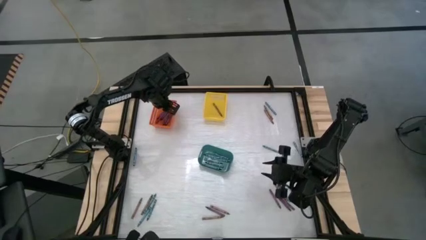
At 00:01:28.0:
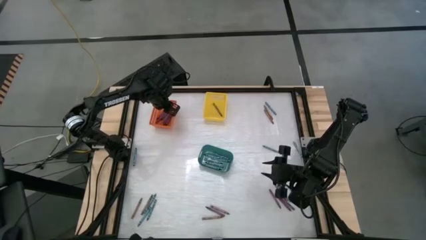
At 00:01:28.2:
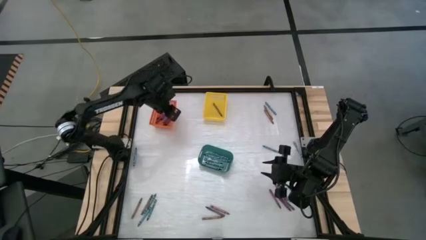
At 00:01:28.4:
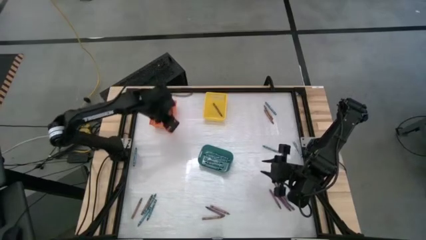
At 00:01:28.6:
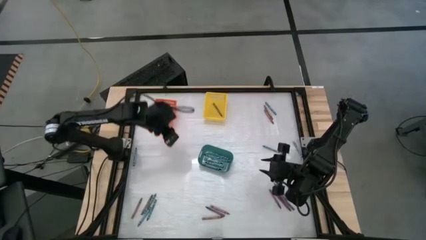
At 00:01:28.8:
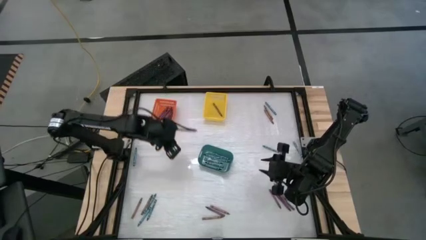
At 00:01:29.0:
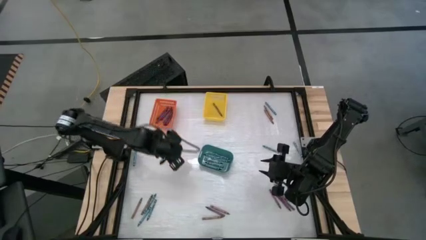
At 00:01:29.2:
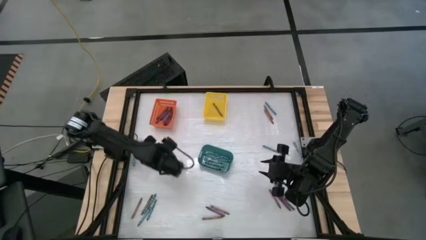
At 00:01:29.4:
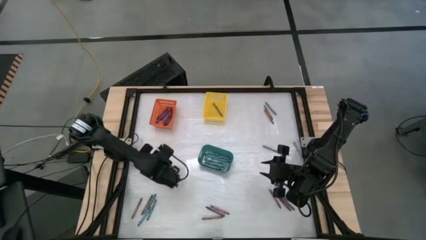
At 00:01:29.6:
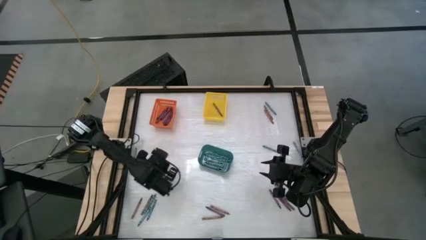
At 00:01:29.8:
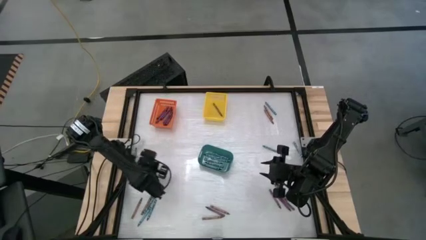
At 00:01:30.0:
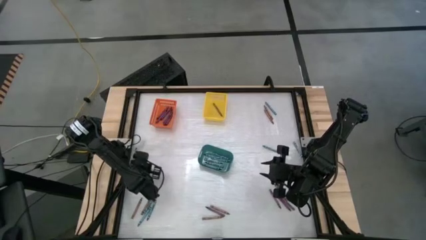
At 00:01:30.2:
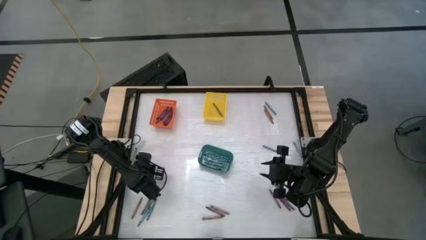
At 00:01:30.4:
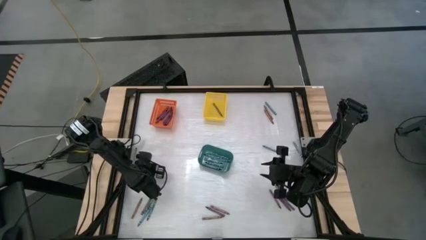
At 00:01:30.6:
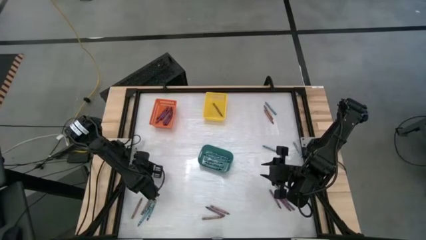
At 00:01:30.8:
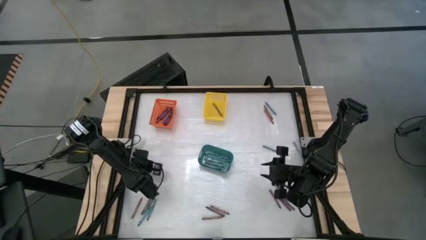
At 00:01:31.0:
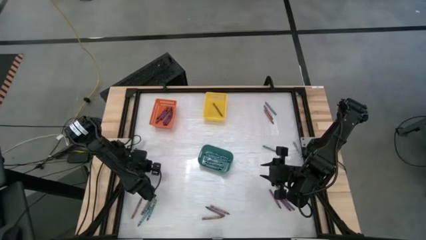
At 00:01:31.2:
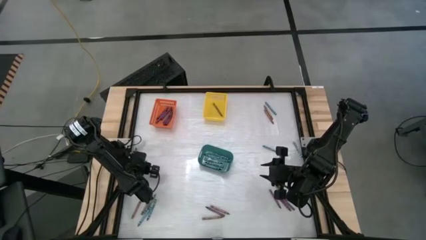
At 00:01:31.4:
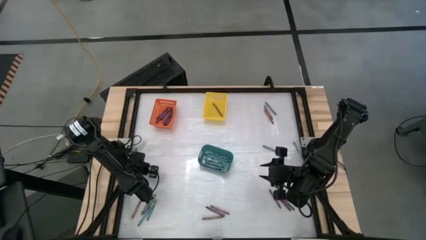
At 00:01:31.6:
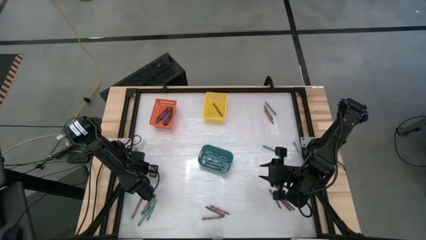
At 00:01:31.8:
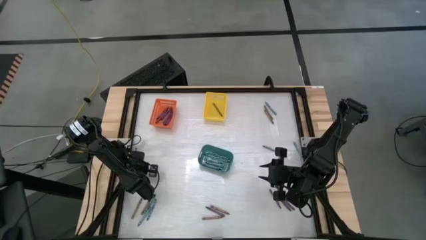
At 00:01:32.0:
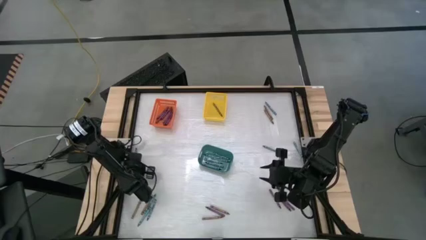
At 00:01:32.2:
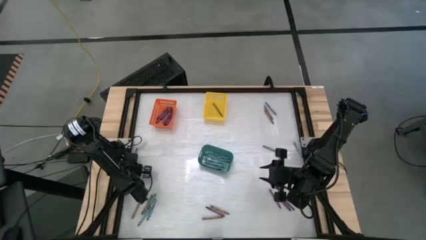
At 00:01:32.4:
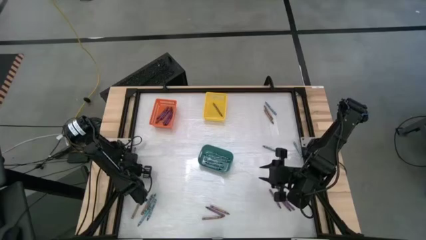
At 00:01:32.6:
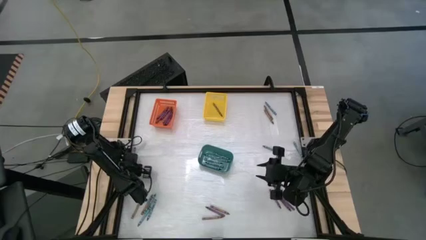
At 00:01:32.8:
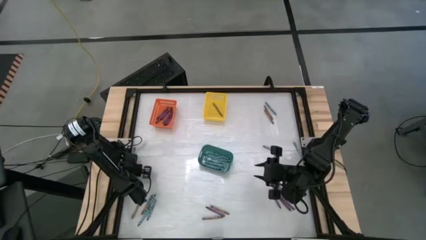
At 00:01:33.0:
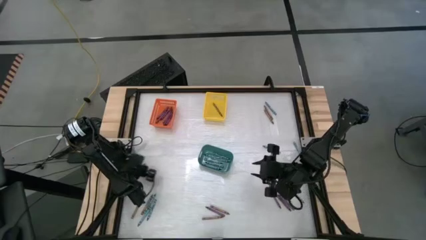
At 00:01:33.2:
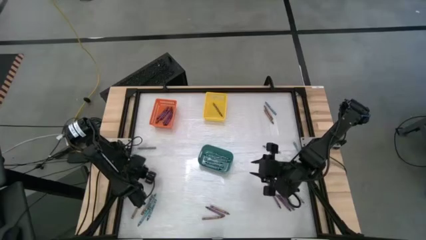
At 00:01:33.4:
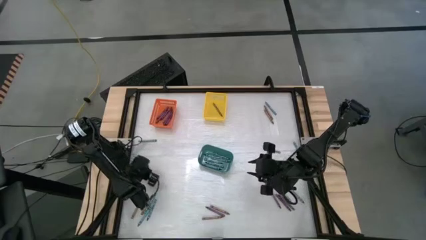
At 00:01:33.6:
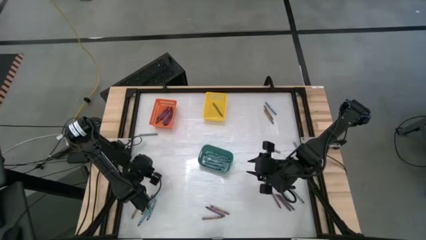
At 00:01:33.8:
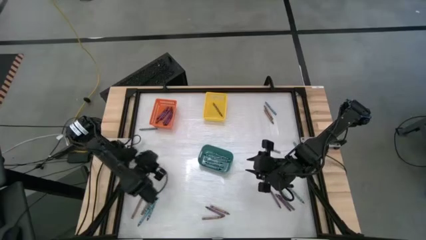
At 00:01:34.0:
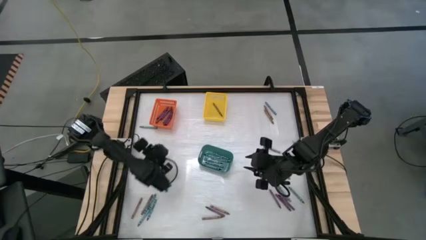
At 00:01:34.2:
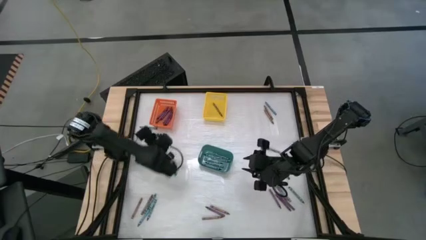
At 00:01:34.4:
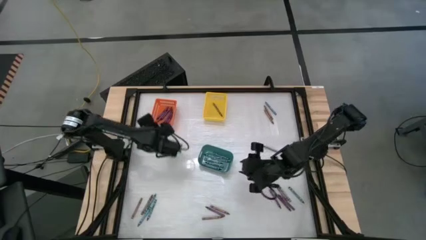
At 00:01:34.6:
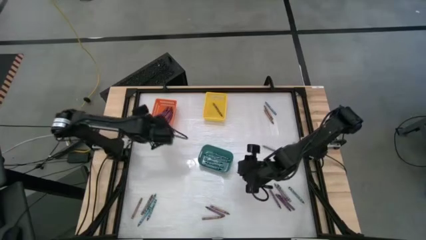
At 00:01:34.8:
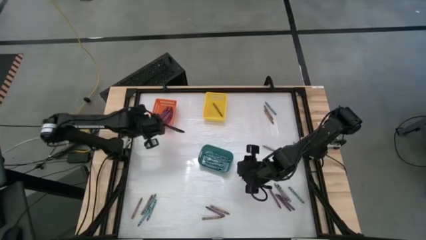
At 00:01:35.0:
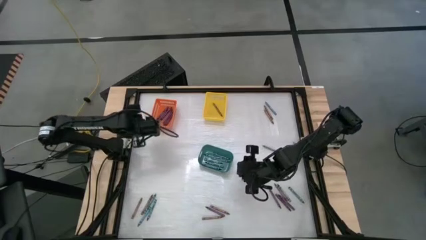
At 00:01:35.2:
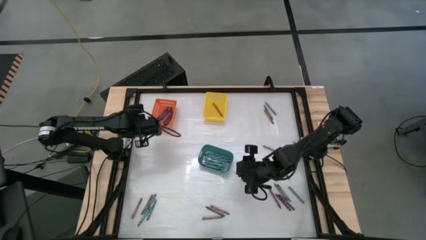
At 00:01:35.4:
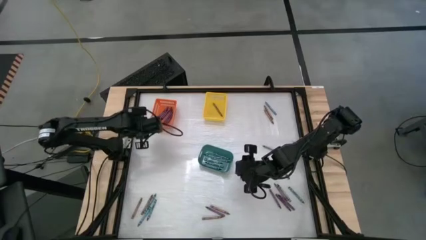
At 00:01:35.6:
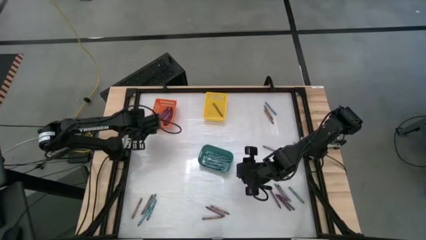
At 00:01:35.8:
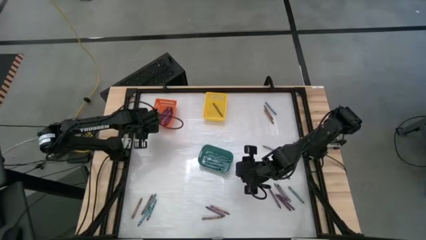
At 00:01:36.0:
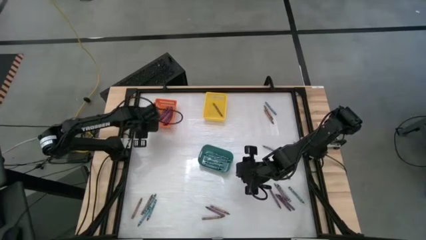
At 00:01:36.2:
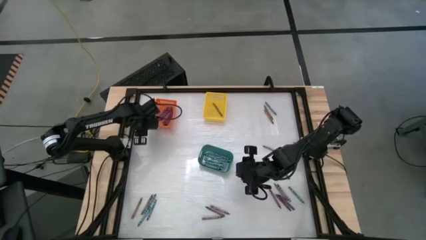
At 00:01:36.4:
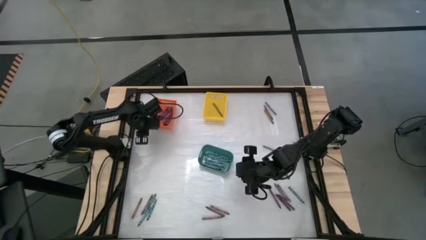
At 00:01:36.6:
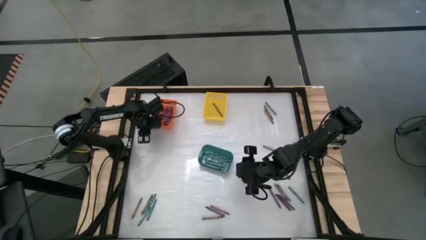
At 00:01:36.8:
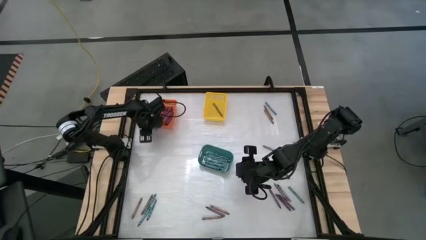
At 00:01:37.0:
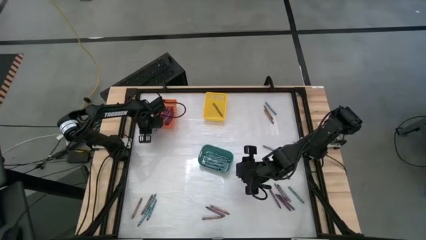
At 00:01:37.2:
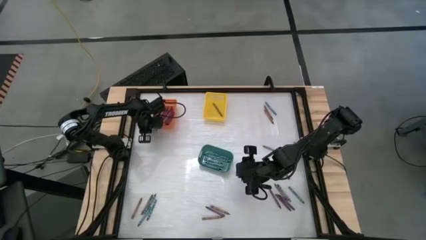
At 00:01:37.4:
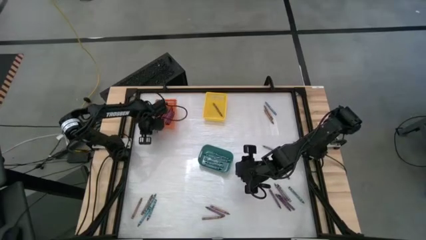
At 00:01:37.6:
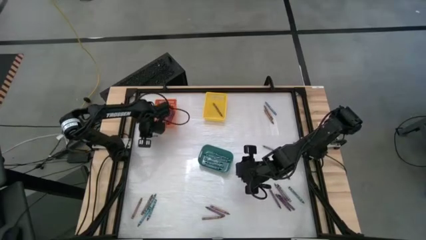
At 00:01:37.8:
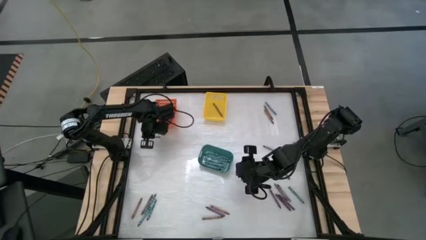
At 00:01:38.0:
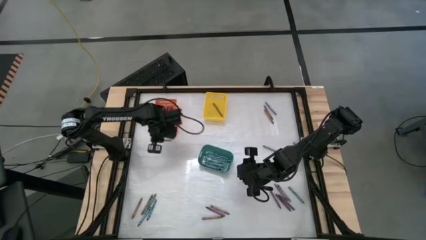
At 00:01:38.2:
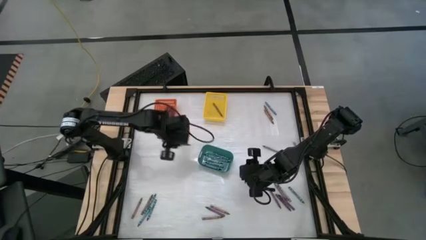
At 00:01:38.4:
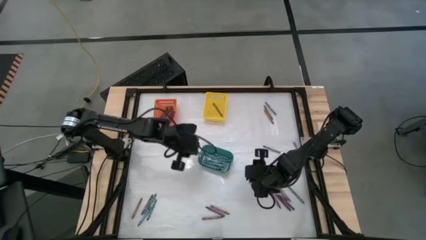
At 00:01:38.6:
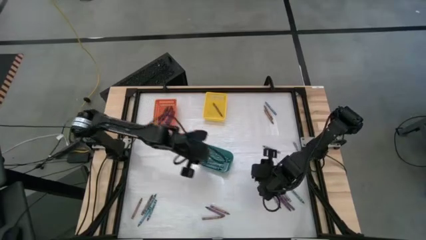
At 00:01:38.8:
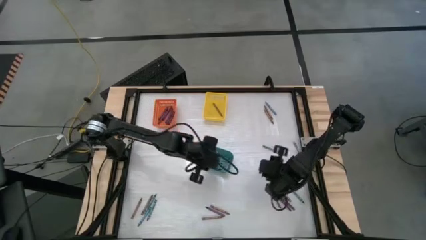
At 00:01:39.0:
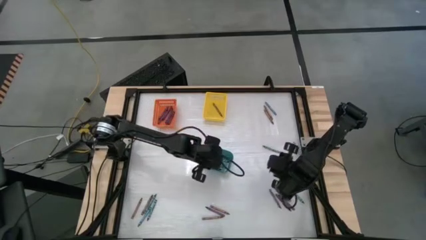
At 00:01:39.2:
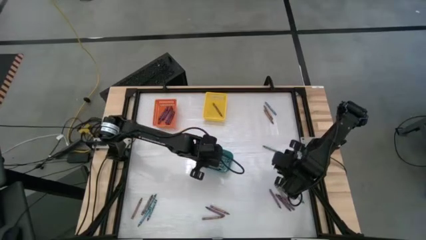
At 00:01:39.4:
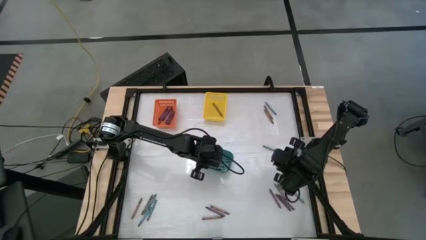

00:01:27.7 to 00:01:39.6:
Task: Sort crayons
Put the blue crayon into the blue bin

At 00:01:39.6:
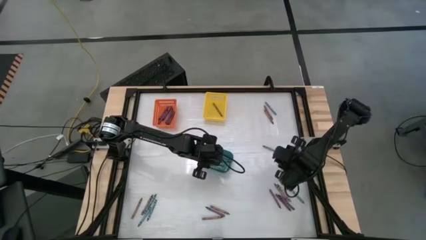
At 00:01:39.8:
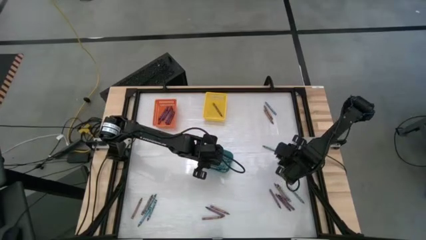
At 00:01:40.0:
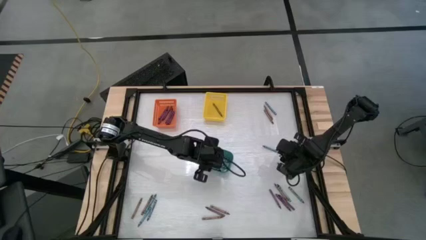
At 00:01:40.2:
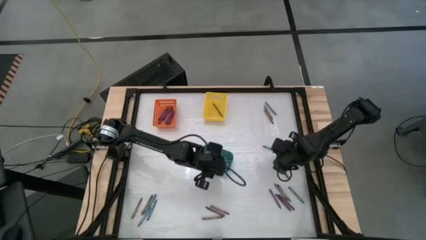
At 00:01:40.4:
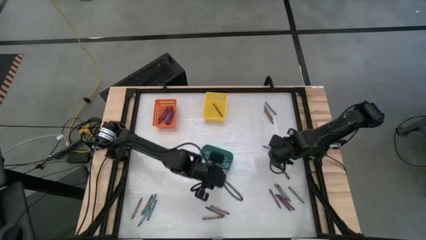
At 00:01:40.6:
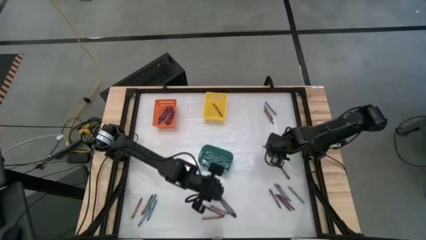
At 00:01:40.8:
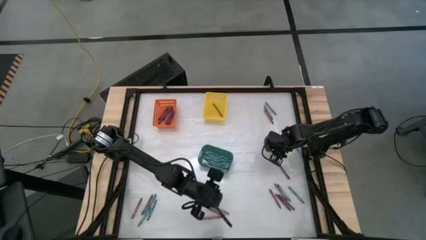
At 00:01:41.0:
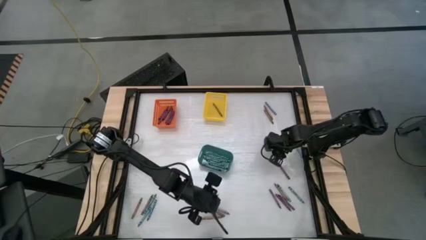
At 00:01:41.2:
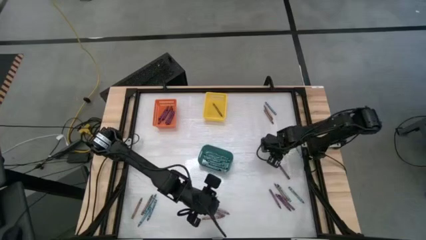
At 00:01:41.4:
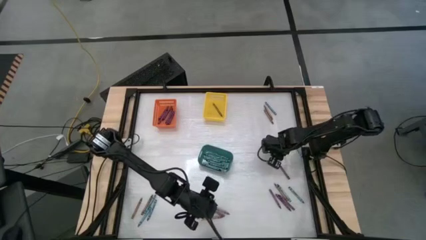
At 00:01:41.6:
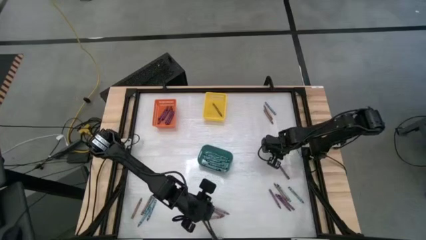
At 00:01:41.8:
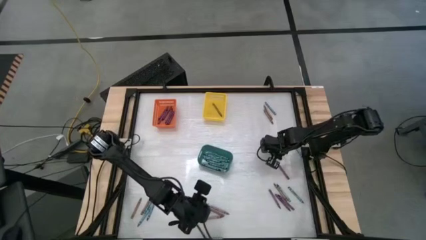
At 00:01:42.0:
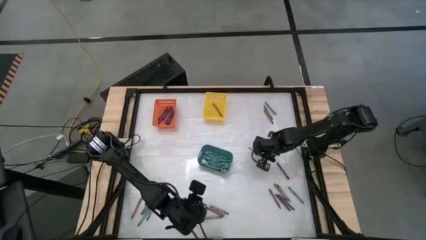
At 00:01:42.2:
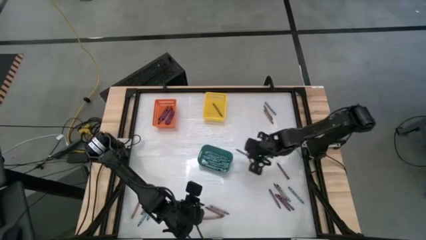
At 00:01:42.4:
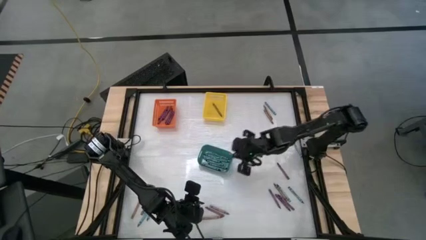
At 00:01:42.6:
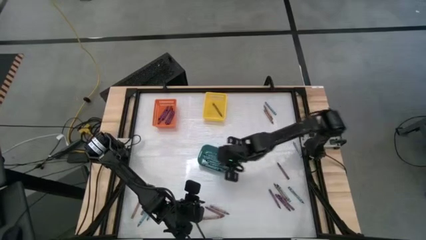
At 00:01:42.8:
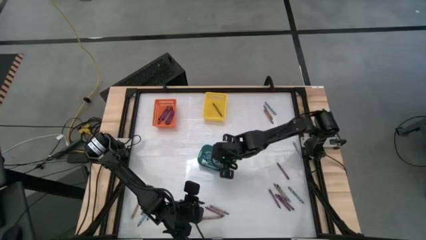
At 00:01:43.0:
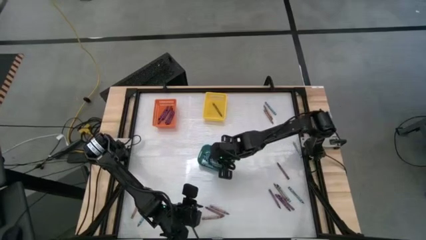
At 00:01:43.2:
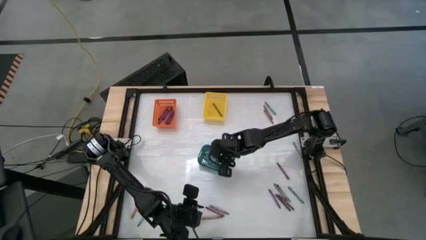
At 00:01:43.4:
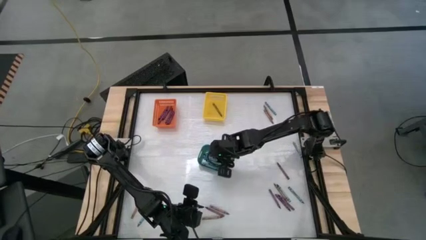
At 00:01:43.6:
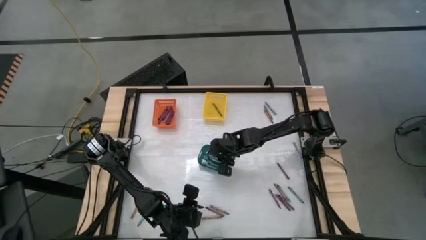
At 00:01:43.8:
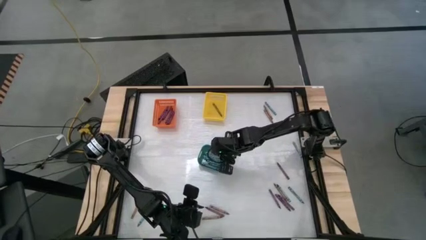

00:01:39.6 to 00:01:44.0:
Put the blue crayon into the blue bin
